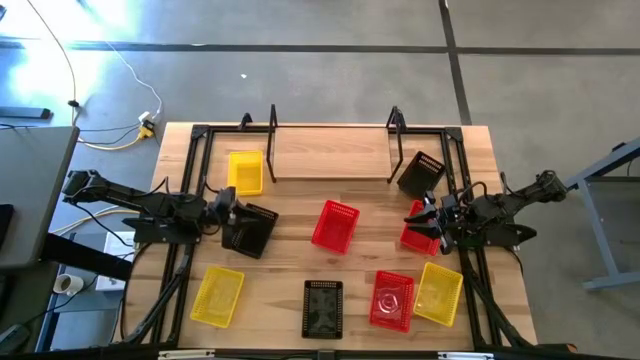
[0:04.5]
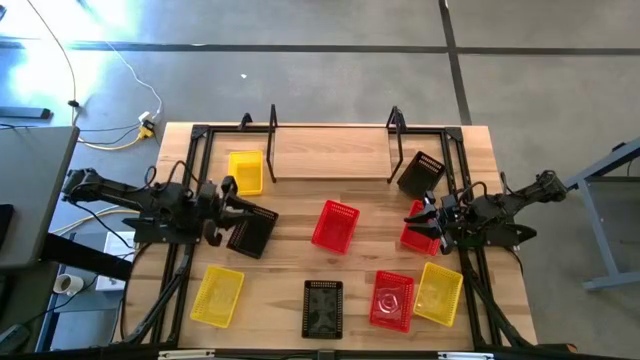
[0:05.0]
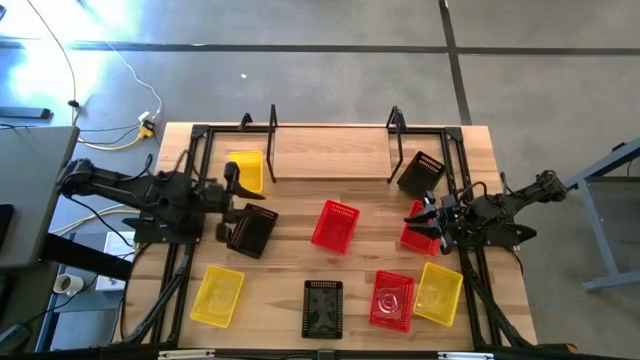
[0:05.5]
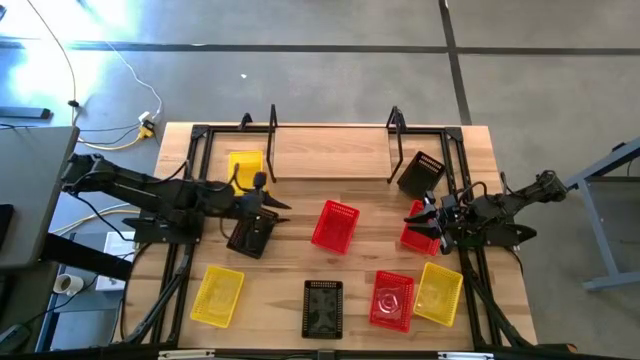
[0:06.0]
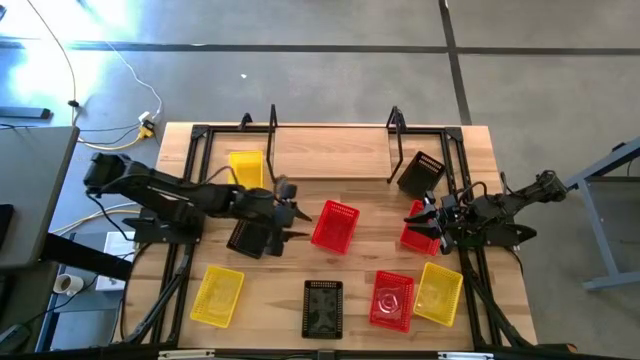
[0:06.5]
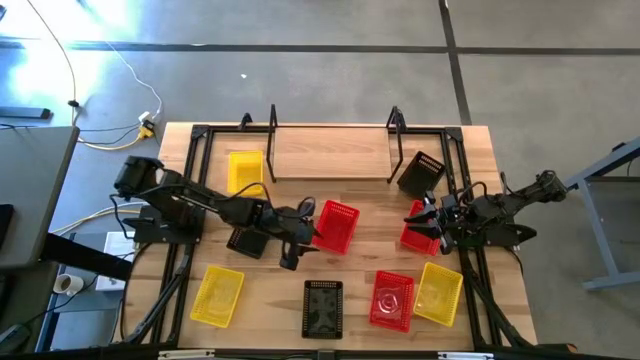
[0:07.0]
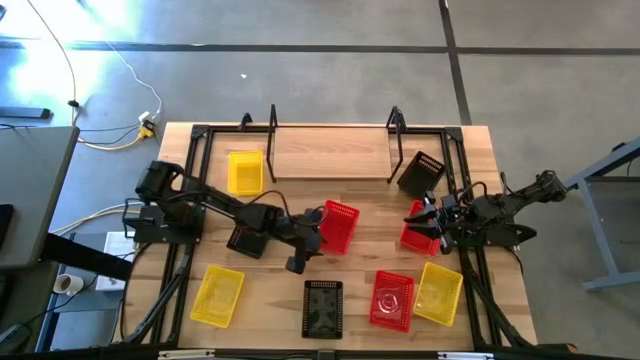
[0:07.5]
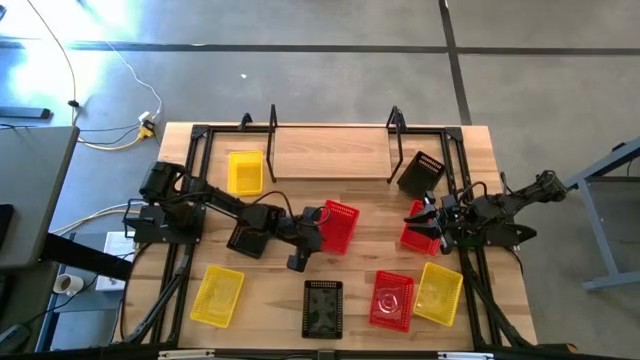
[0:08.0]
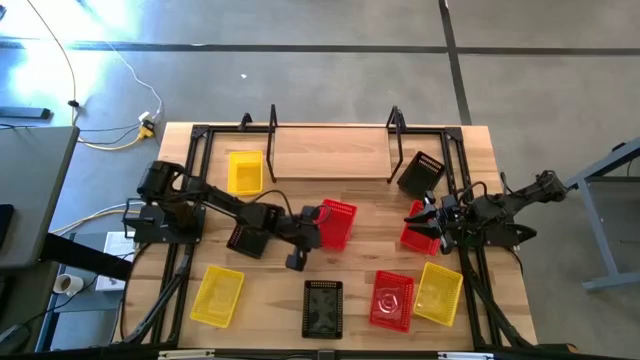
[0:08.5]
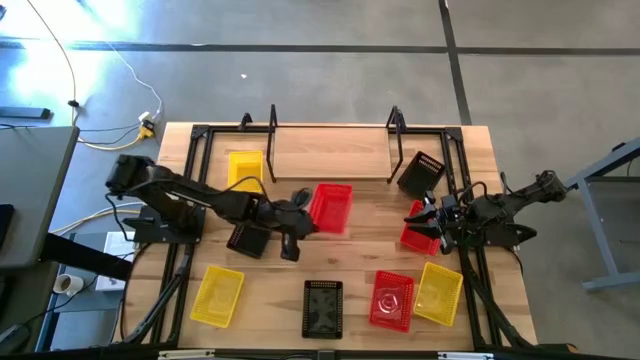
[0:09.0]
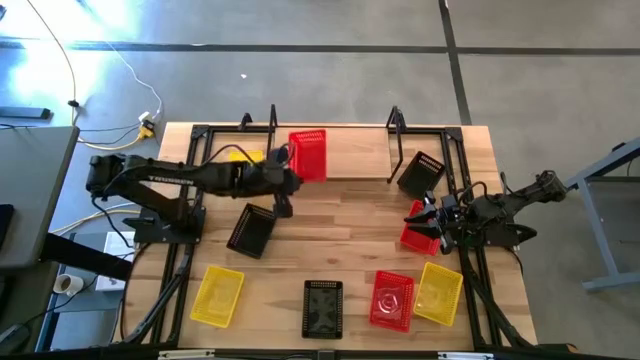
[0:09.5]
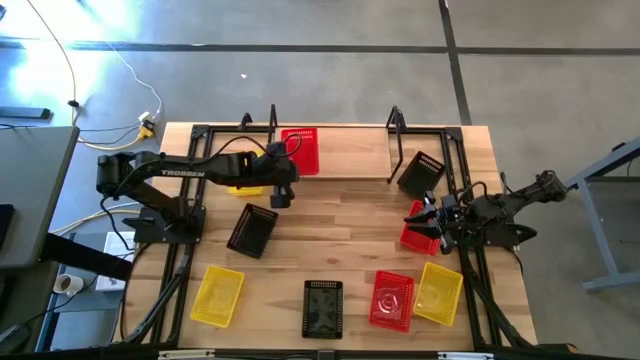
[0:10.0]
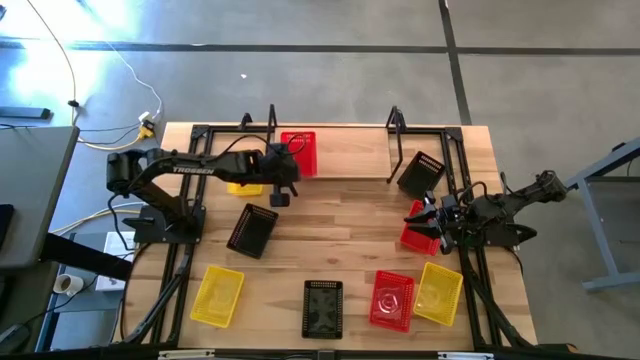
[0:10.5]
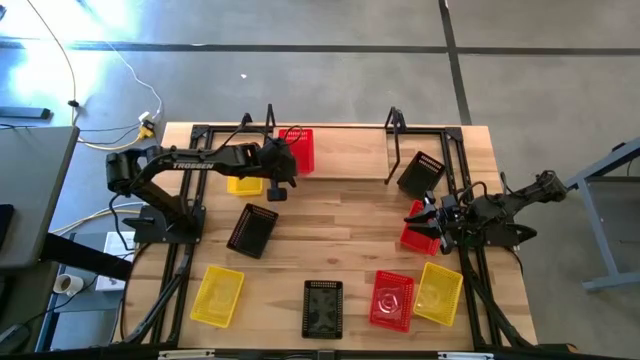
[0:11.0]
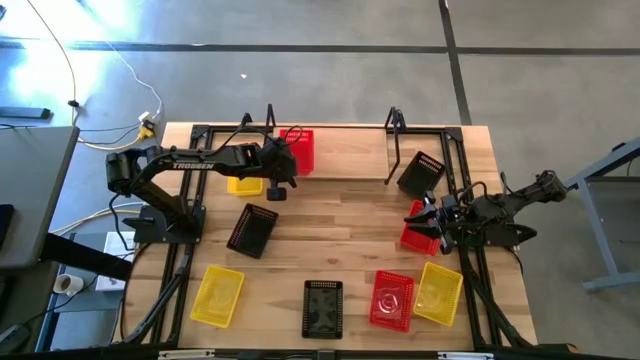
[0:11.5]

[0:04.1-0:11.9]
Task: Stack baskets on shelf by color
Put the top left red bin on the shelf

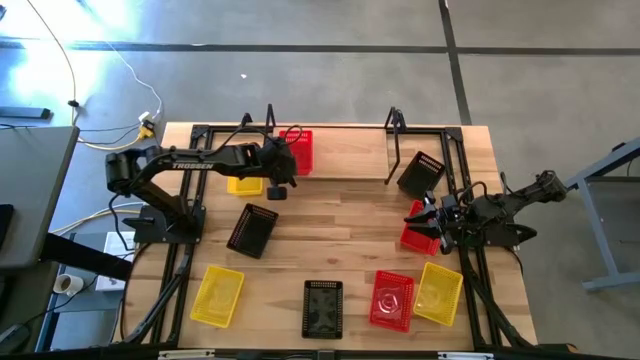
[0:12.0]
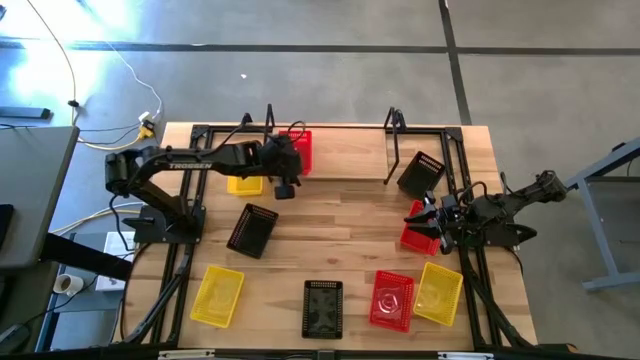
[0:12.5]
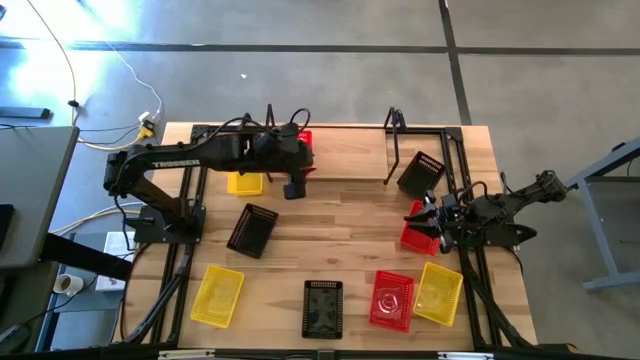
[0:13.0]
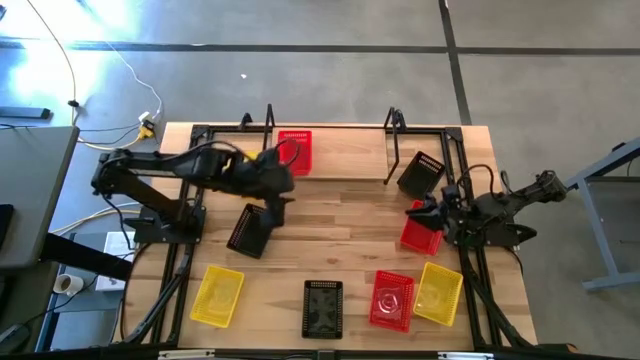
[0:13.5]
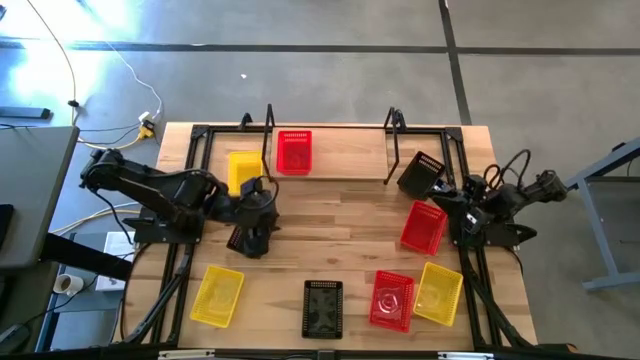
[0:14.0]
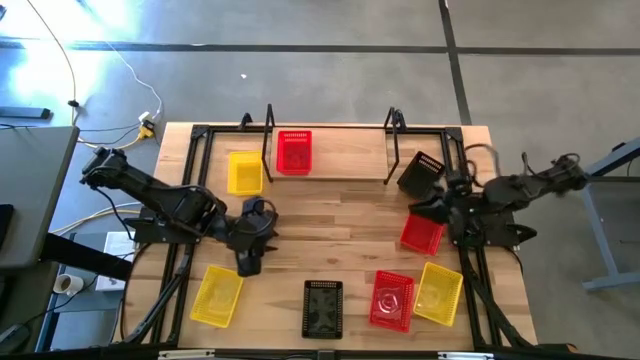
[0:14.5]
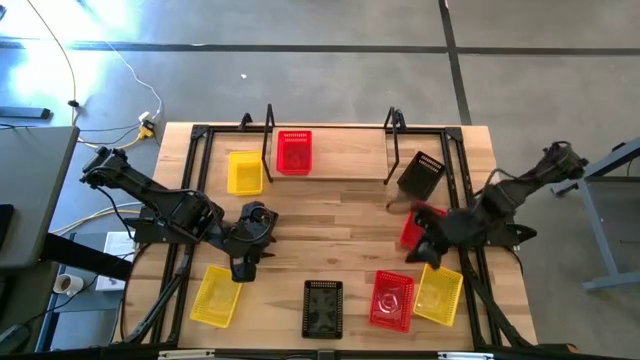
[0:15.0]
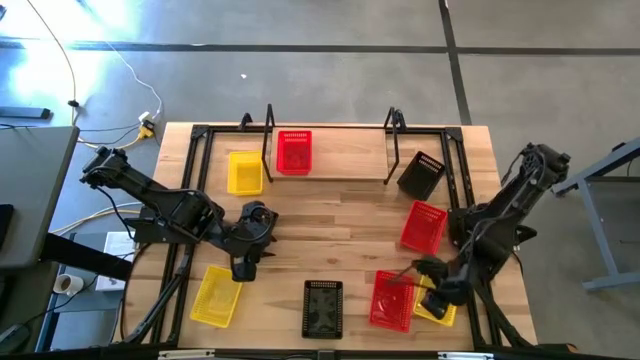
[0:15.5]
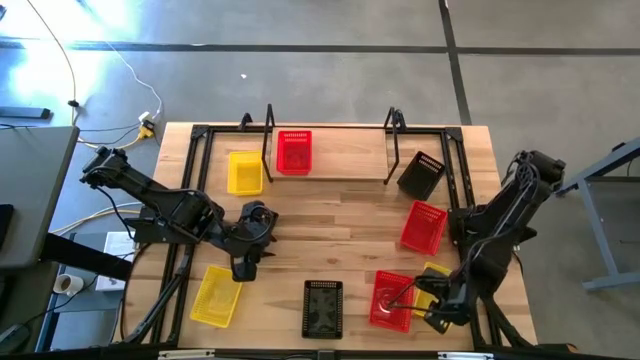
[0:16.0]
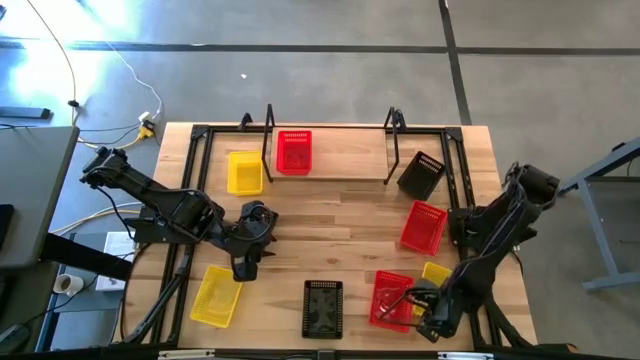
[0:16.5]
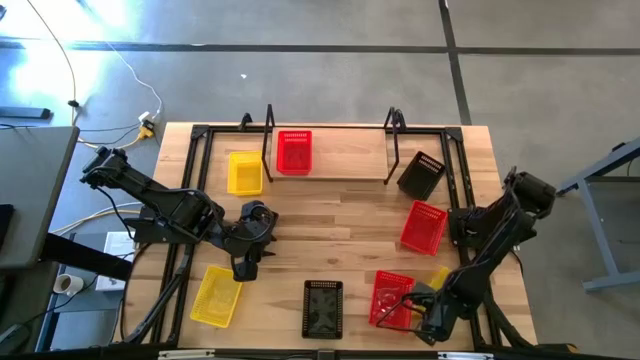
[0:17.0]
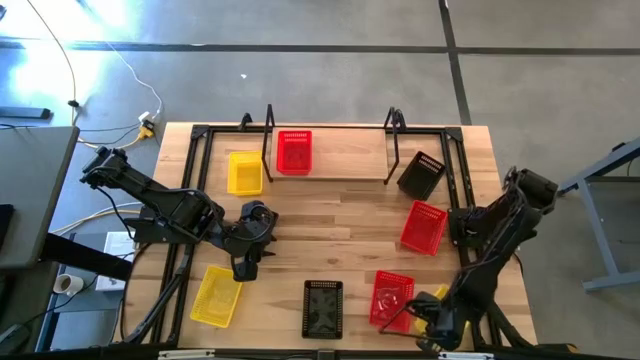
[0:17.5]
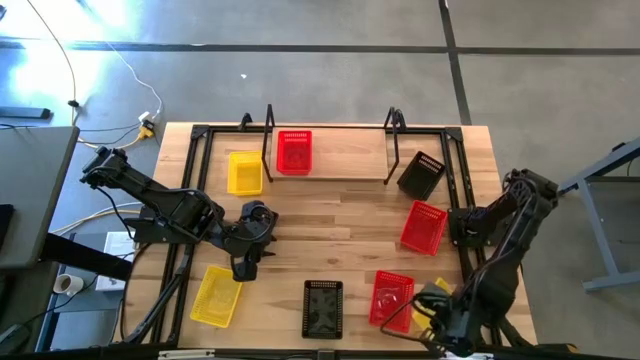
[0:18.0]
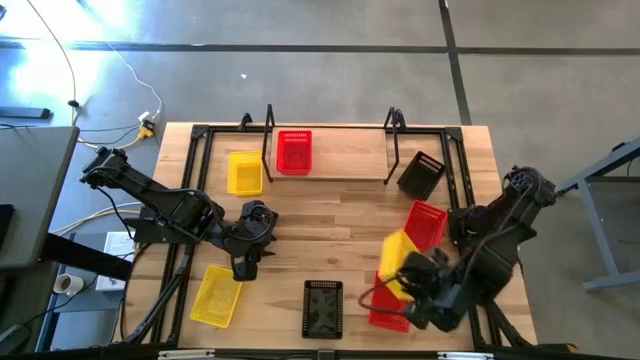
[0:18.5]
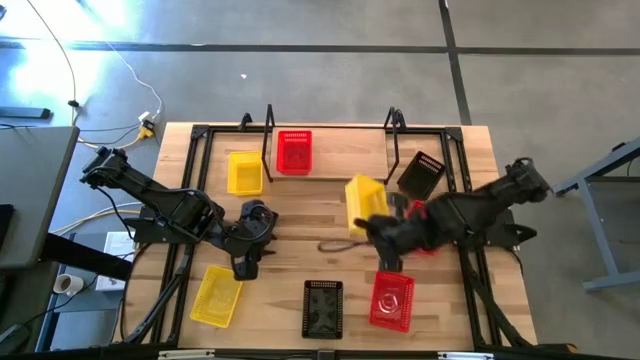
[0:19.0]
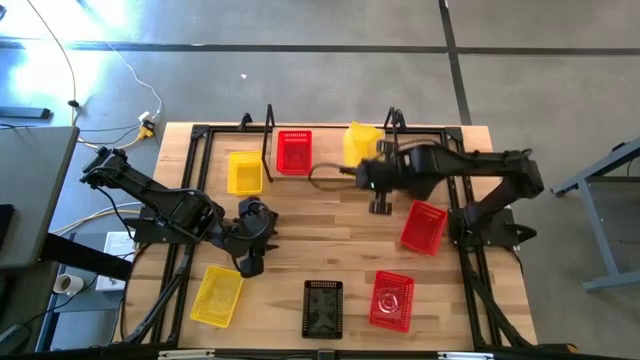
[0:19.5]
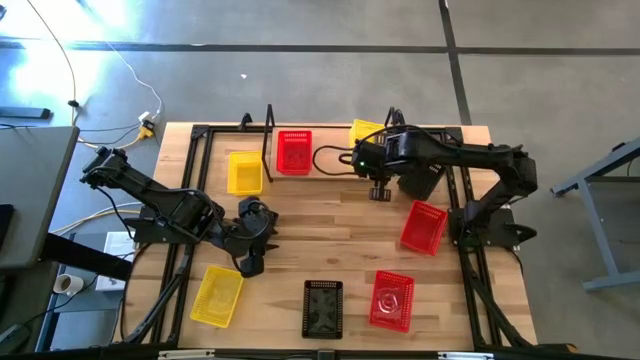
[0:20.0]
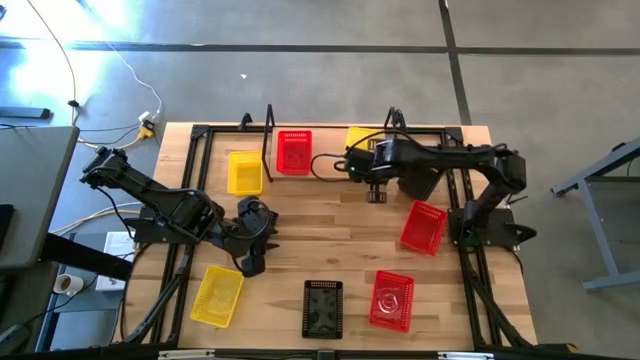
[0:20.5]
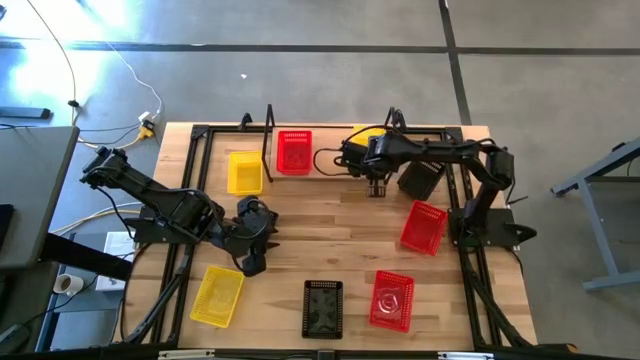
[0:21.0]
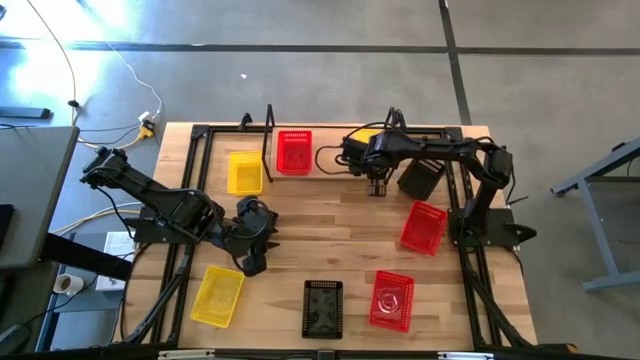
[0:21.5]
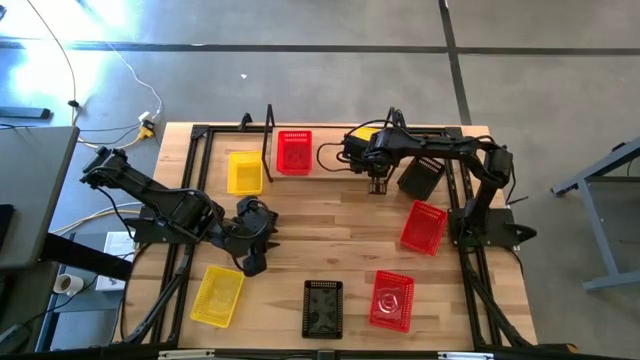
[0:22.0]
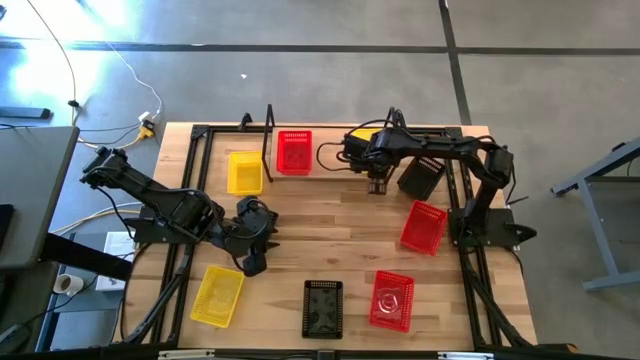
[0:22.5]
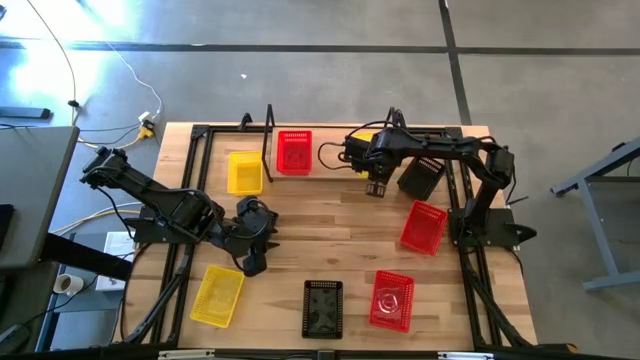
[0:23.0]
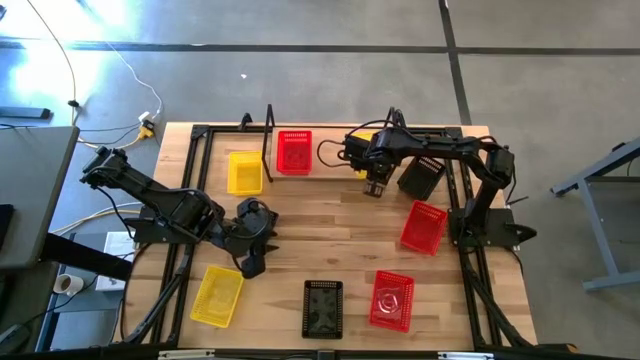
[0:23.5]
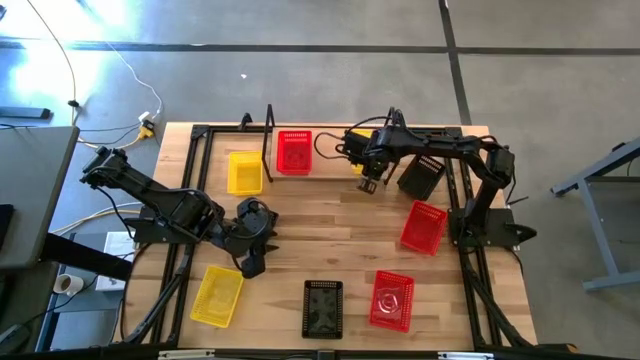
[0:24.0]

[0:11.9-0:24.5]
Put the bottom right yellow bin on the shelf

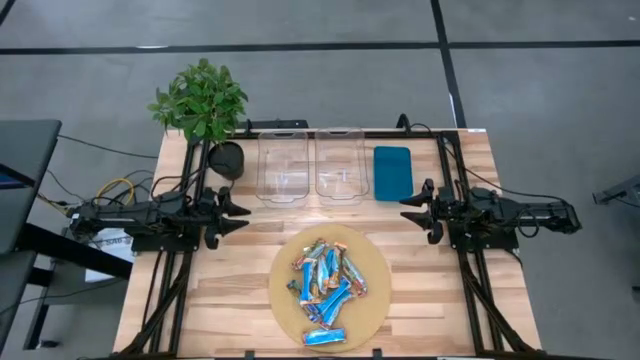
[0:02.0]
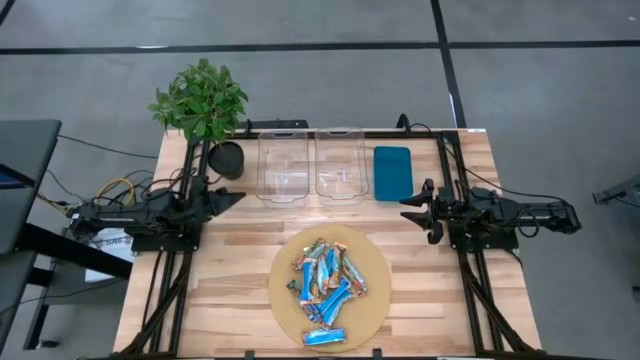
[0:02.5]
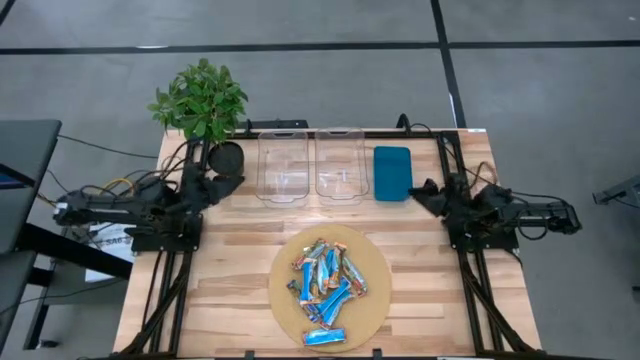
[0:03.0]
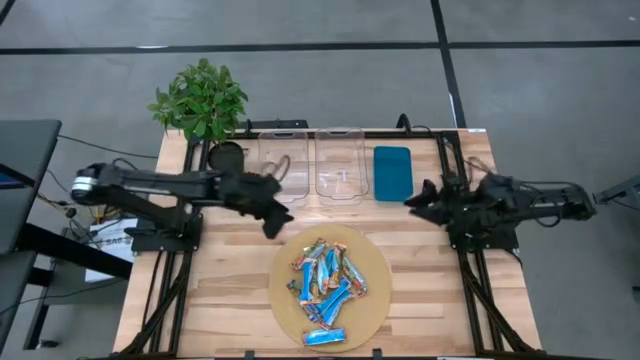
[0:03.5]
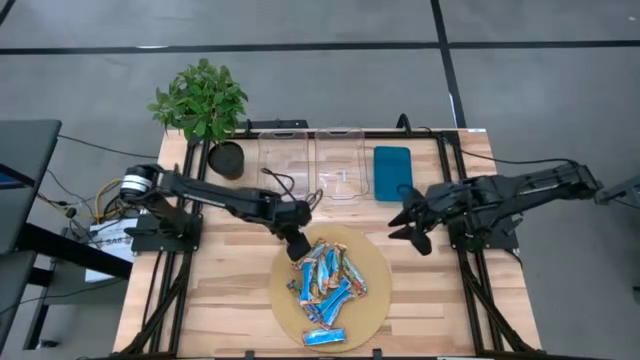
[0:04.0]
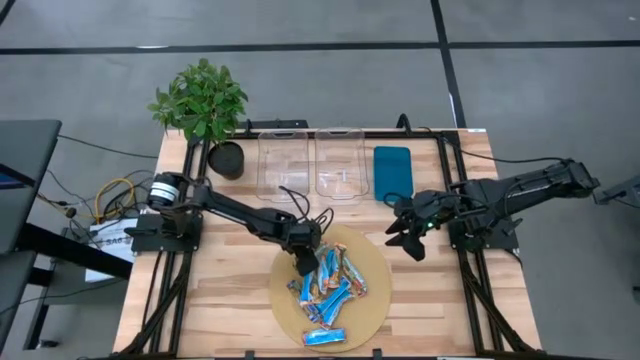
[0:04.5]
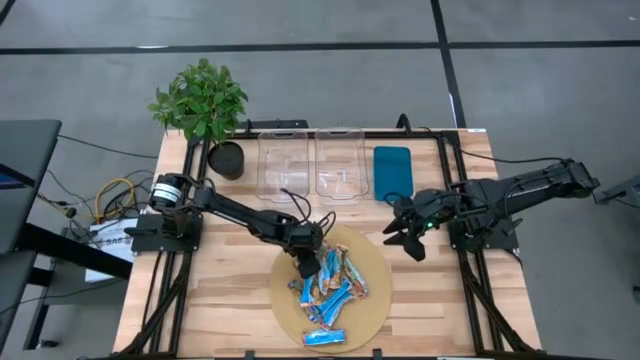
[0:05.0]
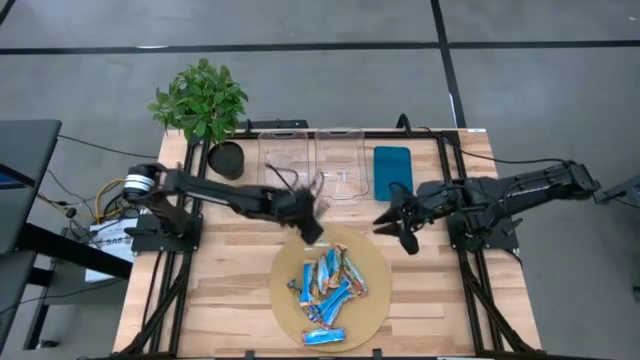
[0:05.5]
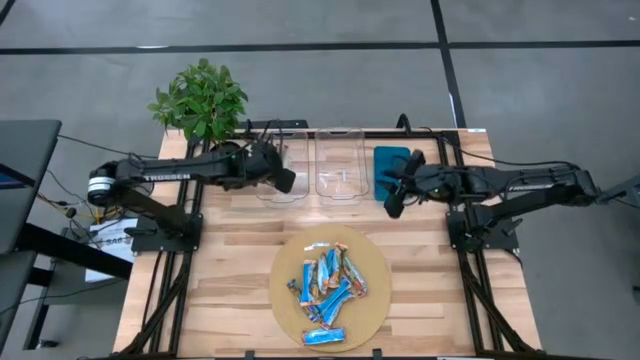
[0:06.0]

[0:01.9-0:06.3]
Task: Pick and place Granola Bars by type
Put the red granola bar into the left transparent bin
